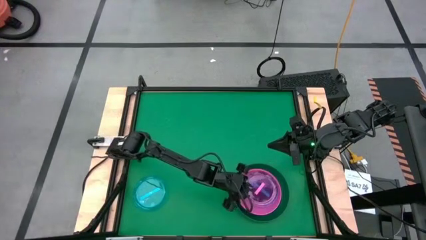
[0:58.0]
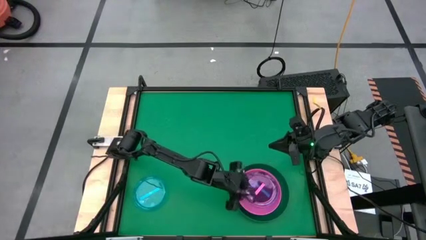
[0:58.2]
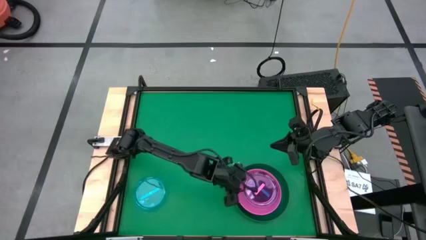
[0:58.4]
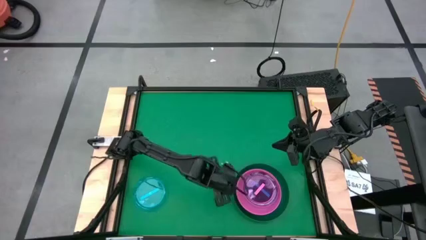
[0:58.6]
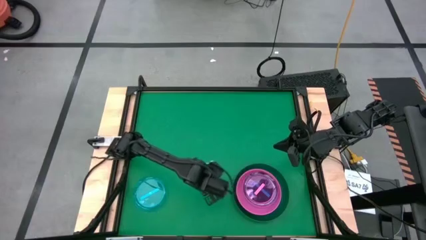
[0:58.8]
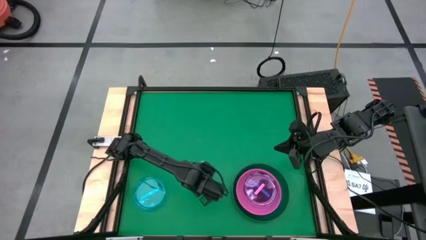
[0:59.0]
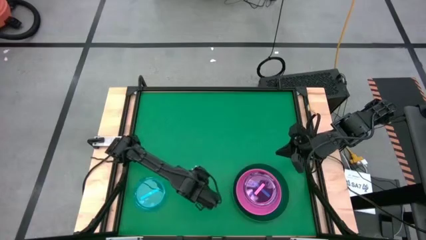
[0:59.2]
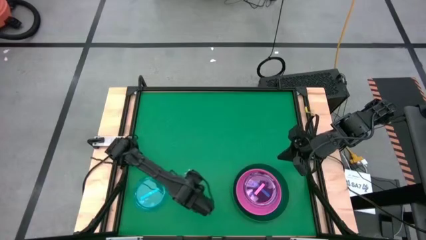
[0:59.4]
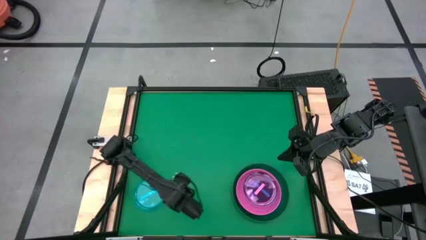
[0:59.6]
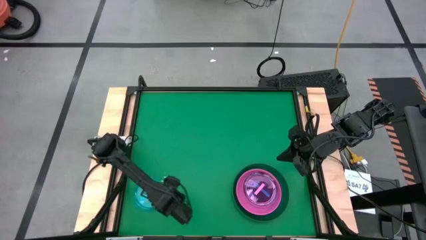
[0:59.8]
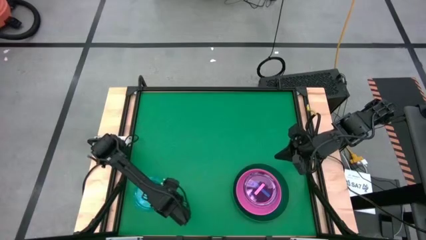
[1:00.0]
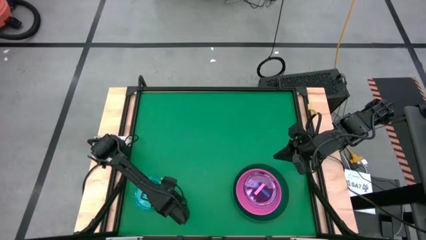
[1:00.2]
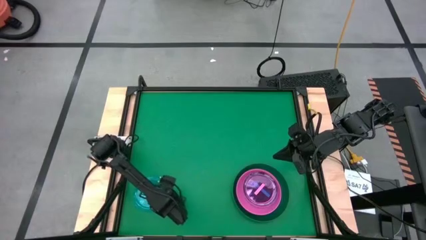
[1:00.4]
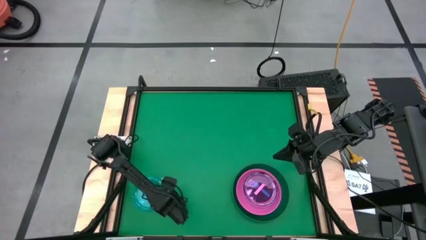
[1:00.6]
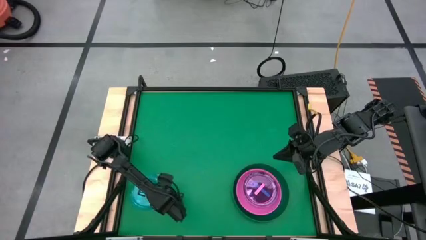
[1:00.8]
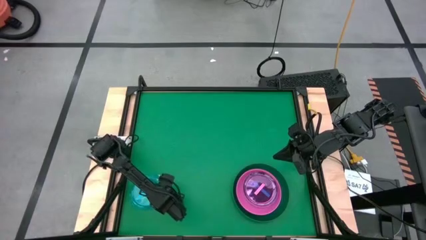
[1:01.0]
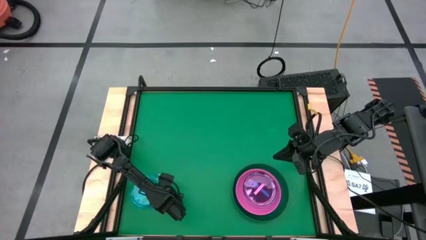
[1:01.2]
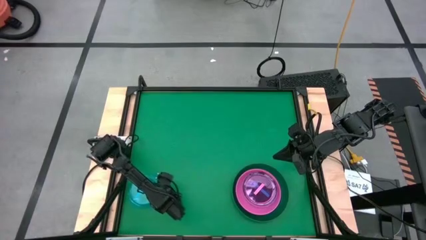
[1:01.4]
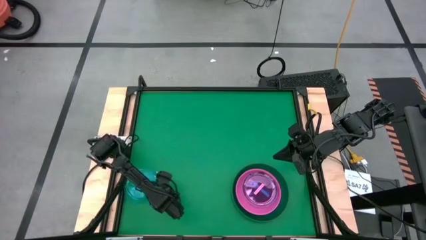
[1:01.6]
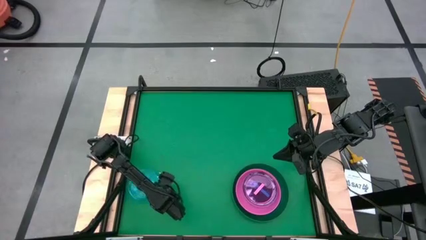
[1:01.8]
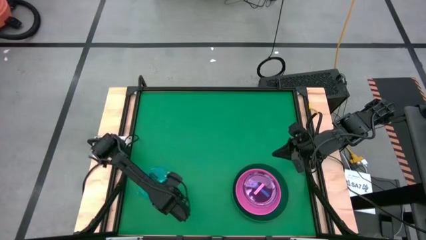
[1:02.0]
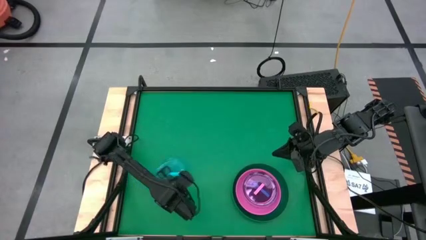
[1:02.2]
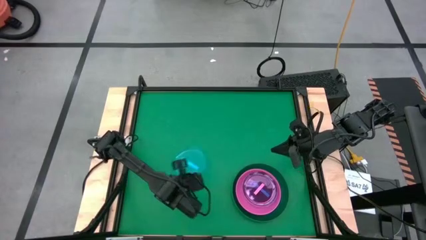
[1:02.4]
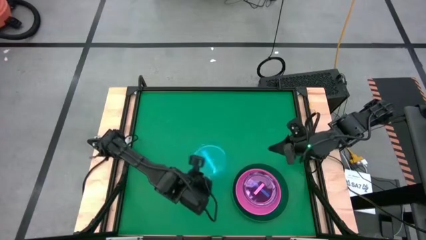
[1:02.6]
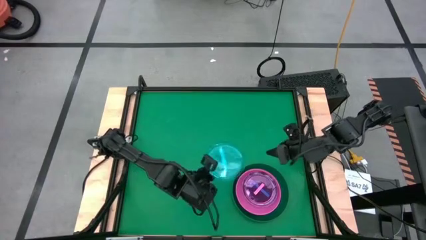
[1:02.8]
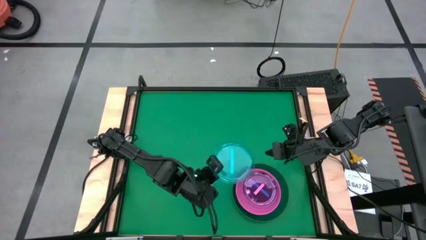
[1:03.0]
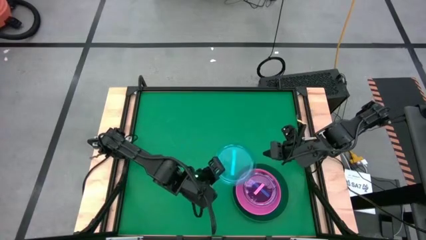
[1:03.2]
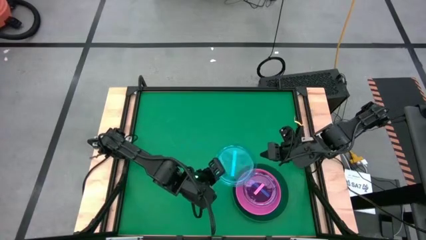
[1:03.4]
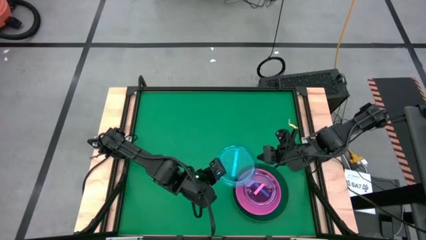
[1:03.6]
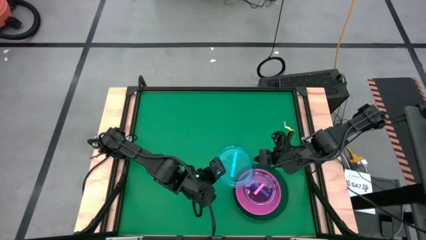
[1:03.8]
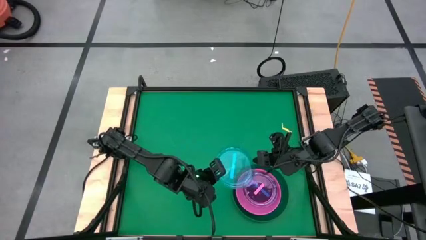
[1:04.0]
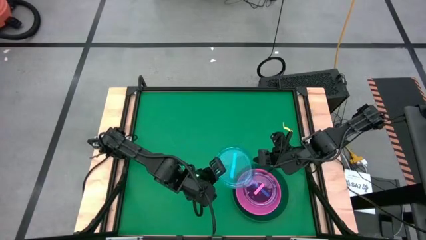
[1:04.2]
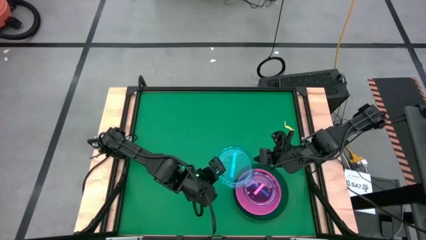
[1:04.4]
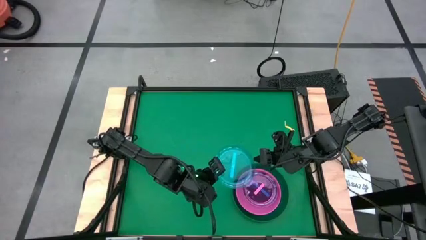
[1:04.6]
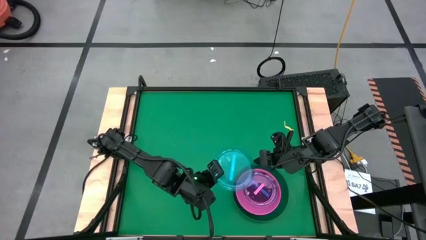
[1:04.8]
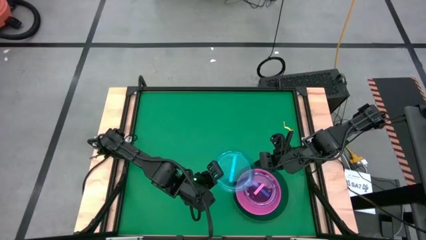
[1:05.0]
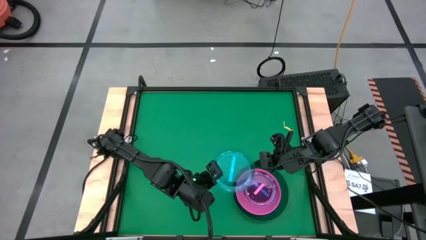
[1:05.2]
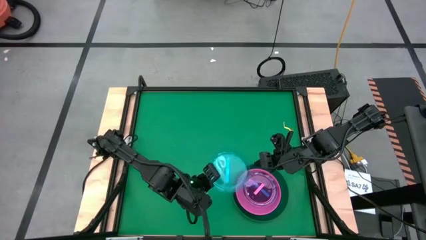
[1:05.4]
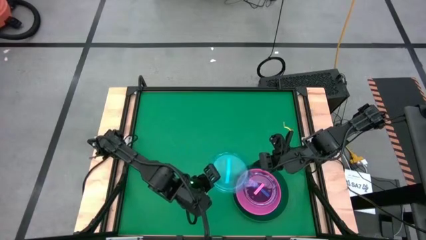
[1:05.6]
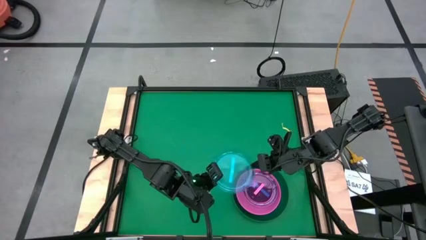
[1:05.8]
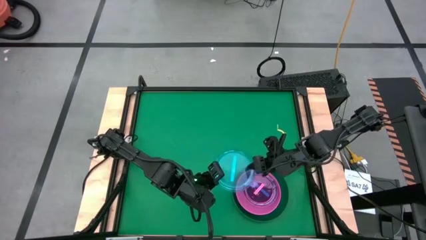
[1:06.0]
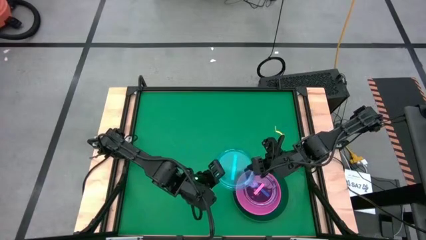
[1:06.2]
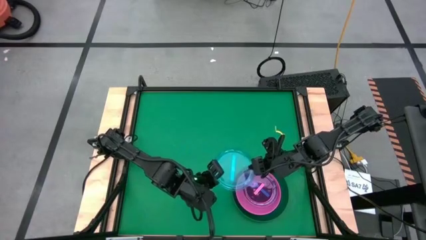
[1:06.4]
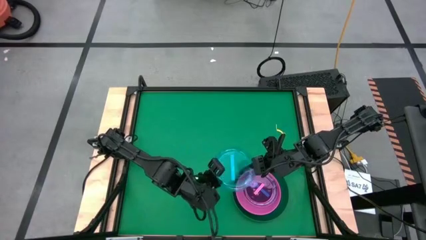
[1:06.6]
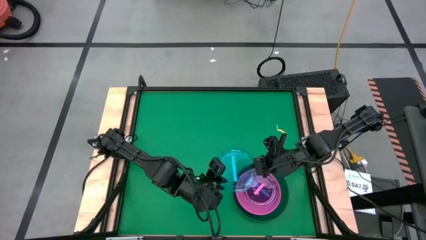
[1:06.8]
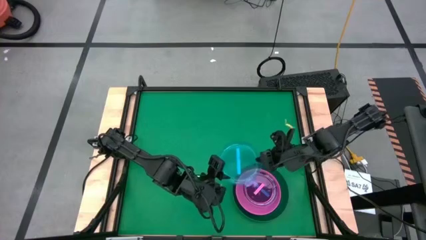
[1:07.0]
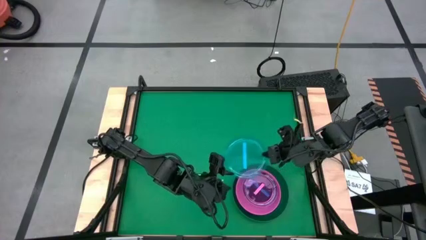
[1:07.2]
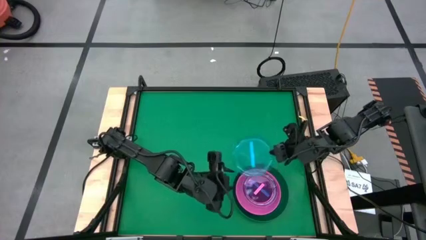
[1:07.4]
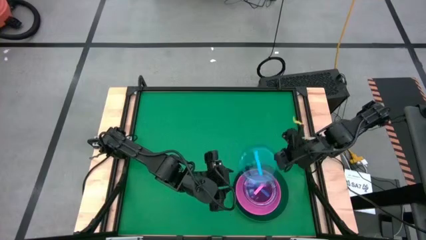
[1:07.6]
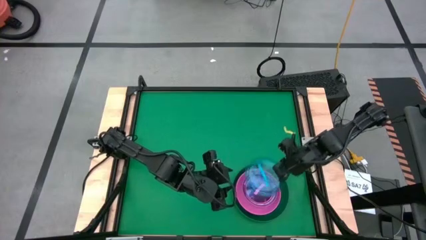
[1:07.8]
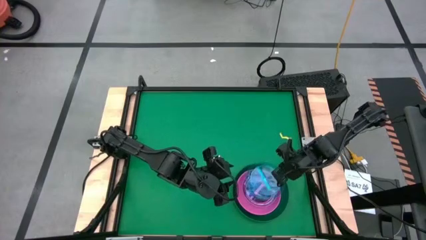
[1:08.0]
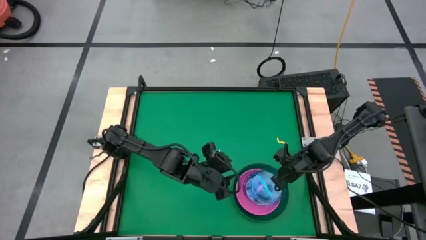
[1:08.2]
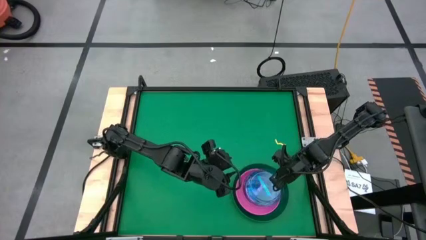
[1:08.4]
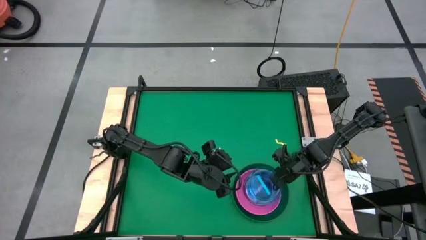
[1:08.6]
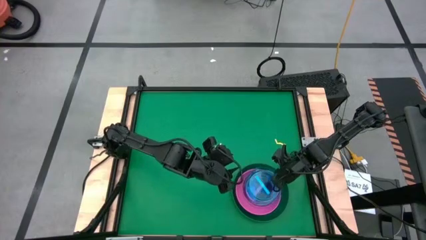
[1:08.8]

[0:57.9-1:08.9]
Task: Stack plastic plates
Stack the blue plate on top of pink plate

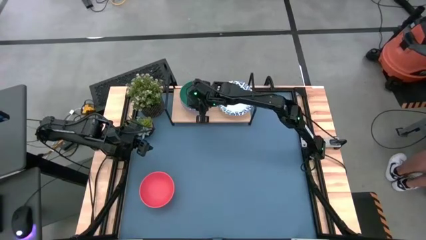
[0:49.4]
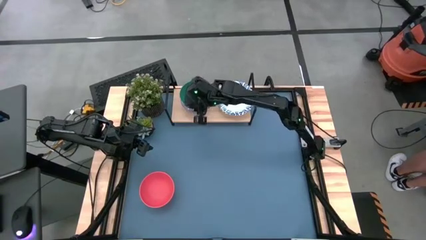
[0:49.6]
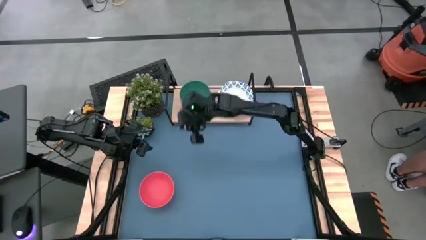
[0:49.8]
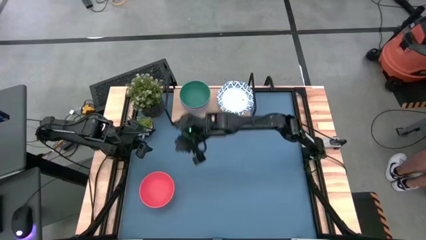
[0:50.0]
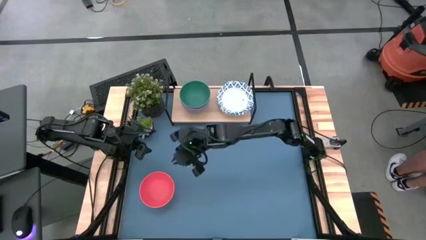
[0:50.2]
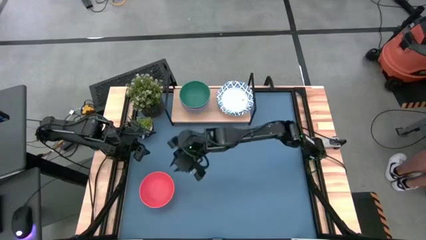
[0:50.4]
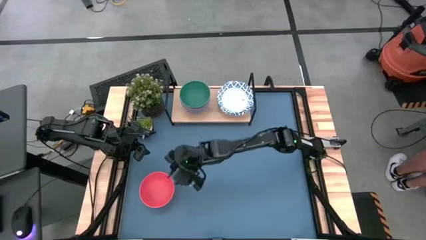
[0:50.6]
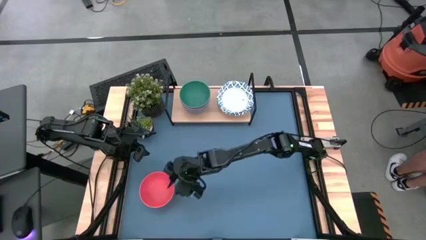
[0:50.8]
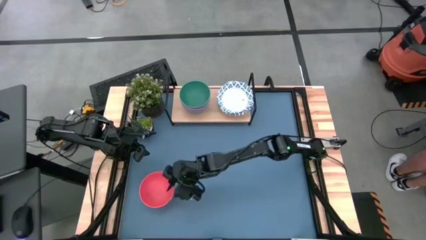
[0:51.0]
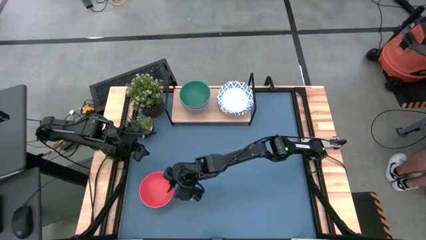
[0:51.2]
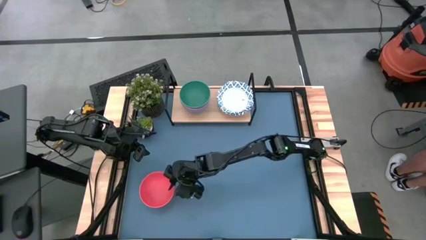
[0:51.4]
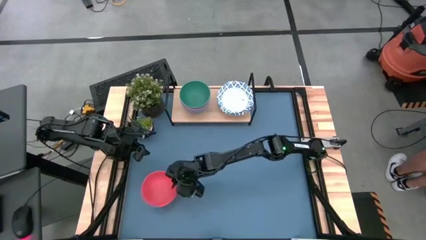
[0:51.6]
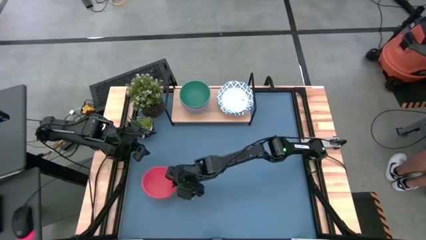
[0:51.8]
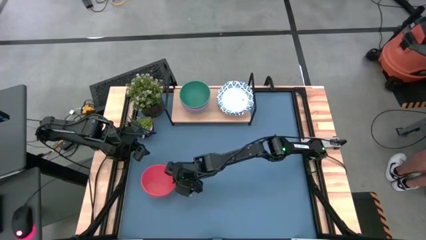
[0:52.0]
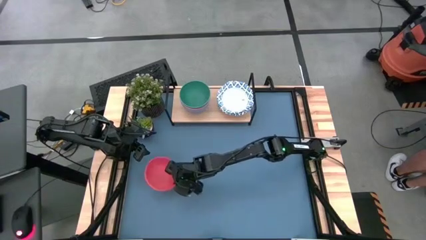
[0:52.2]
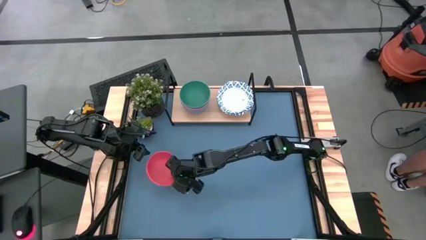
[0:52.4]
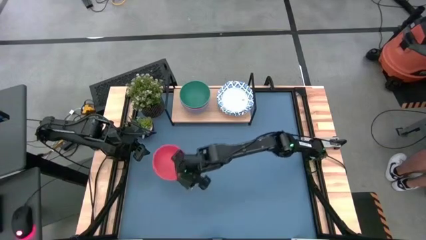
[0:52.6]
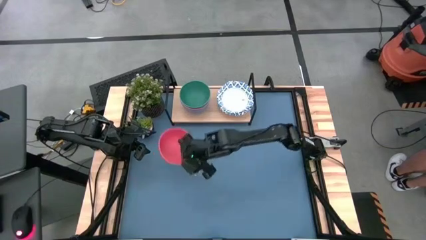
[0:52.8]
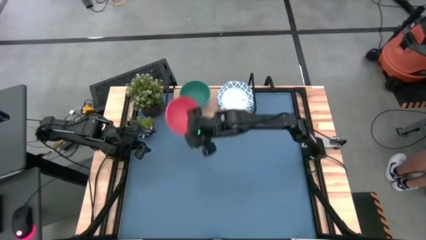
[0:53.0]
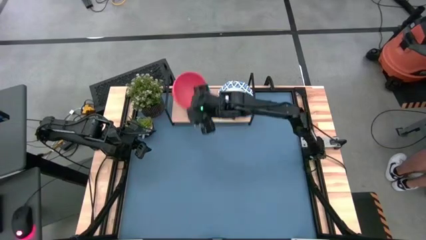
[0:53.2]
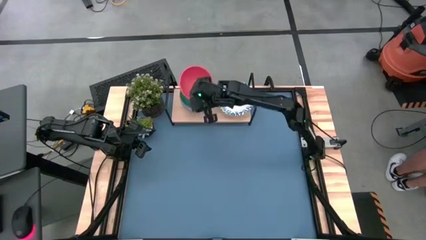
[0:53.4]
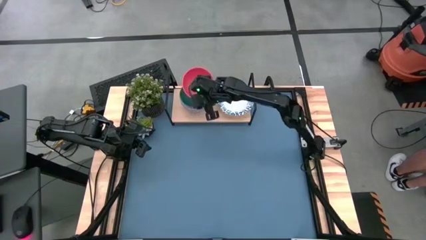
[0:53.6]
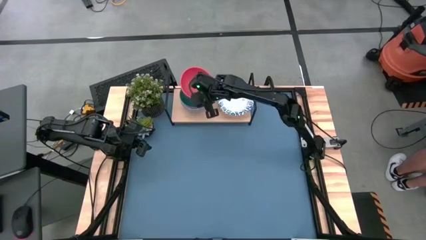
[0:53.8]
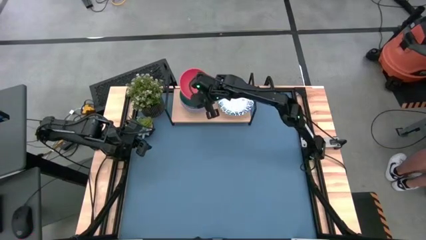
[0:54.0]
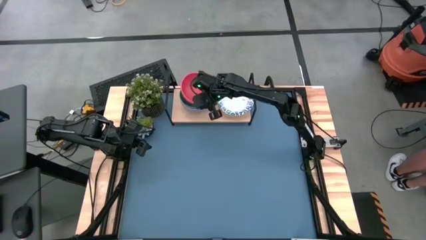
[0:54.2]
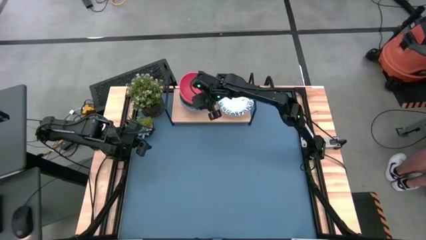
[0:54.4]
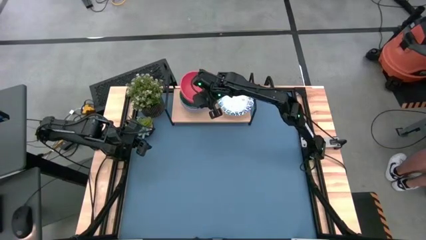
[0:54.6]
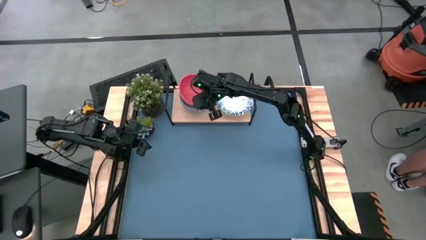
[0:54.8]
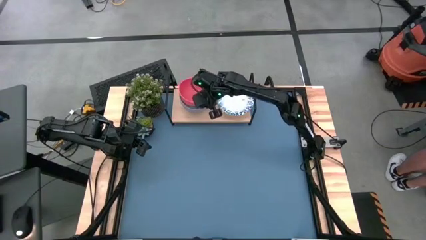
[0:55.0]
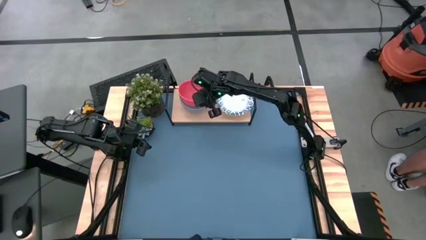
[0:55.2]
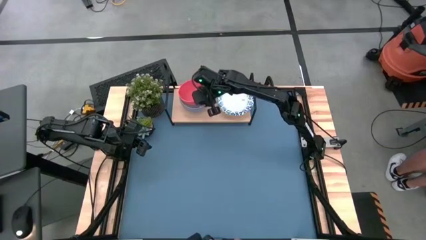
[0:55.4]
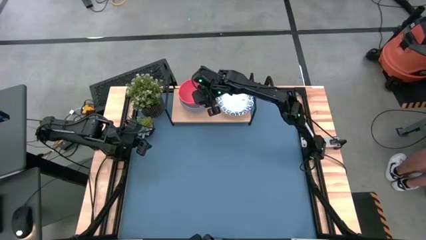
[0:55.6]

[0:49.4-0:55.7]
Task: Place and stack bowls onto a shelf
Stack the orange bowl on top of the green bowl on the shelf
